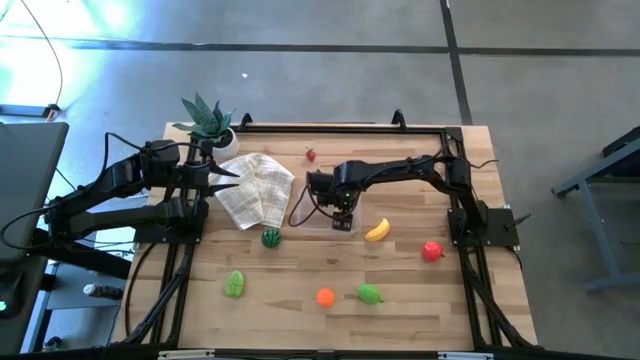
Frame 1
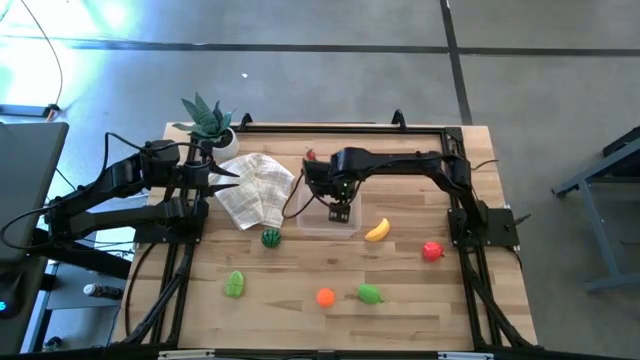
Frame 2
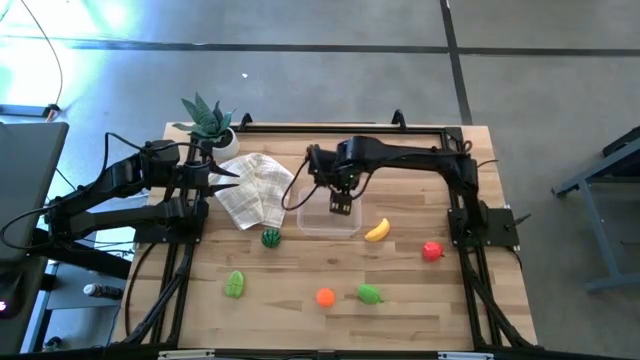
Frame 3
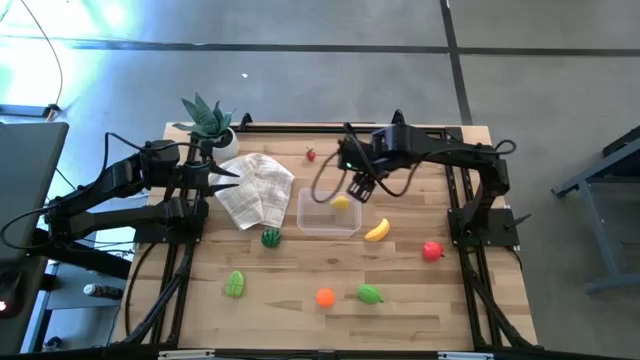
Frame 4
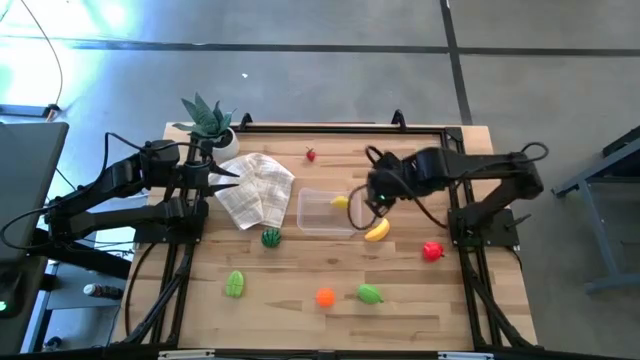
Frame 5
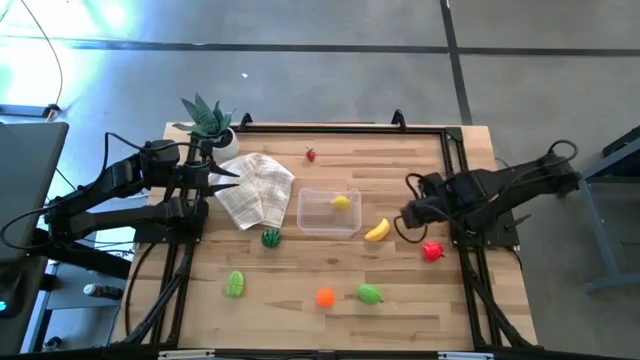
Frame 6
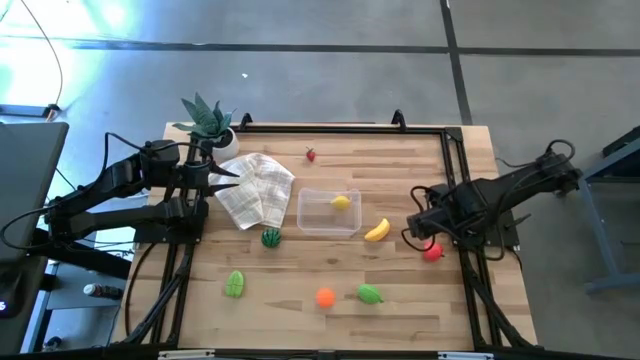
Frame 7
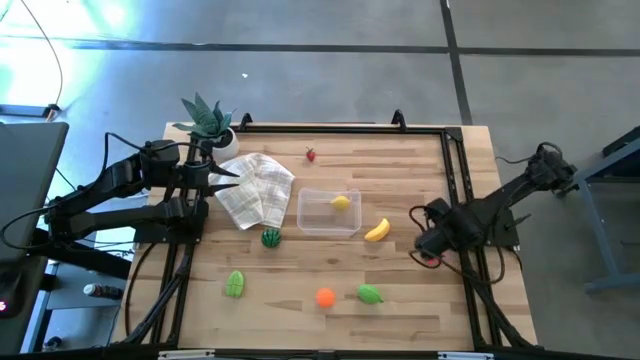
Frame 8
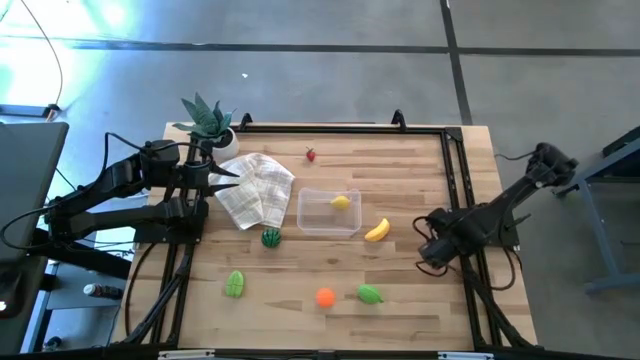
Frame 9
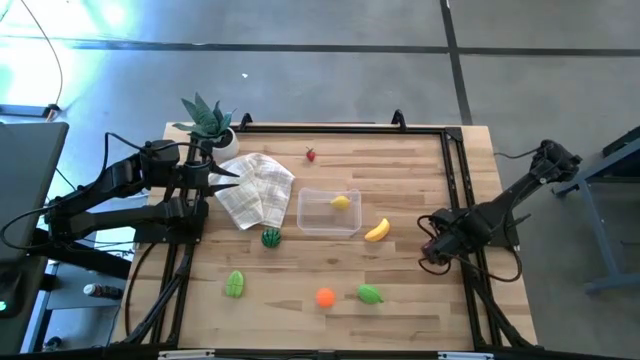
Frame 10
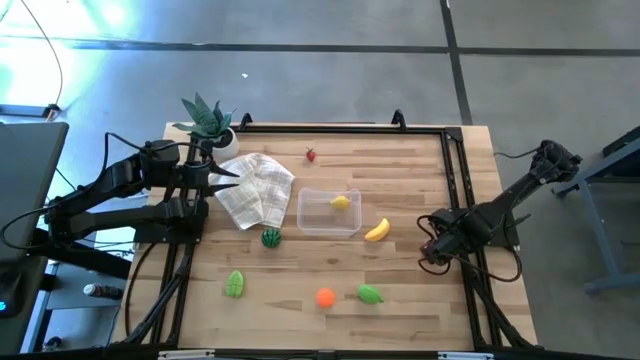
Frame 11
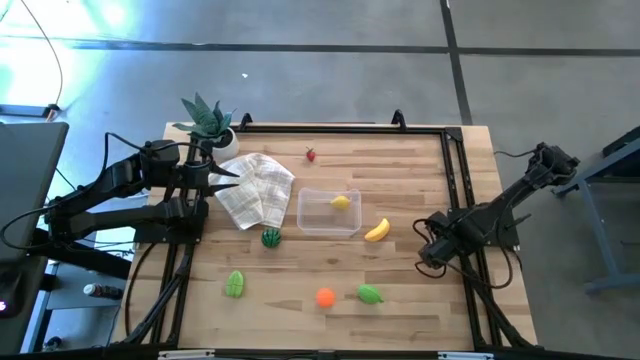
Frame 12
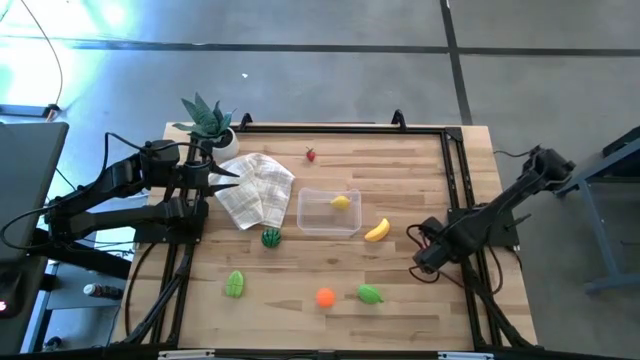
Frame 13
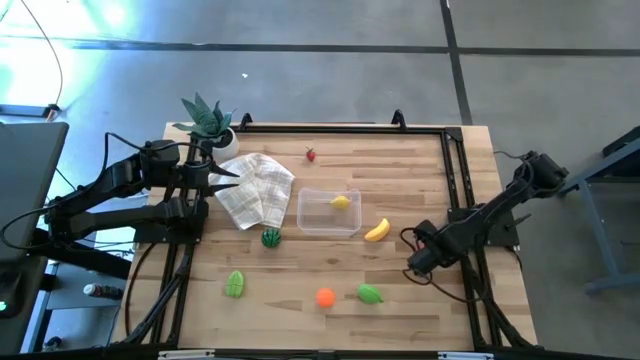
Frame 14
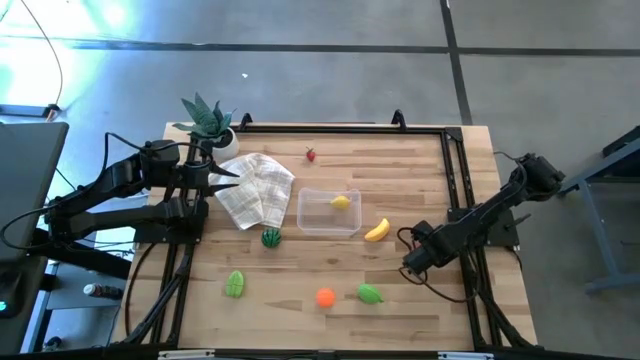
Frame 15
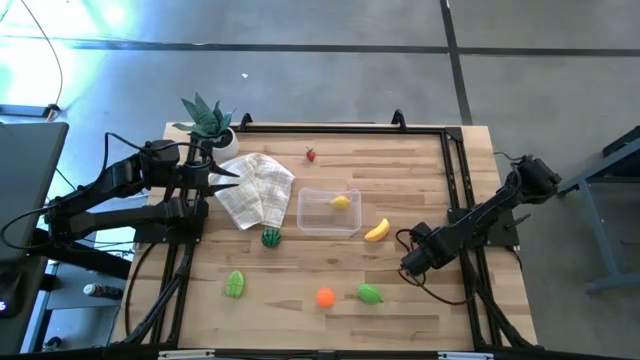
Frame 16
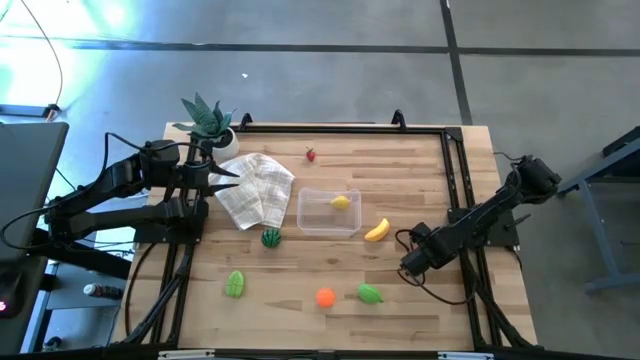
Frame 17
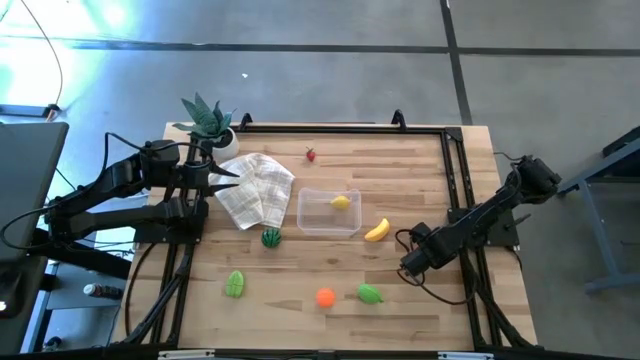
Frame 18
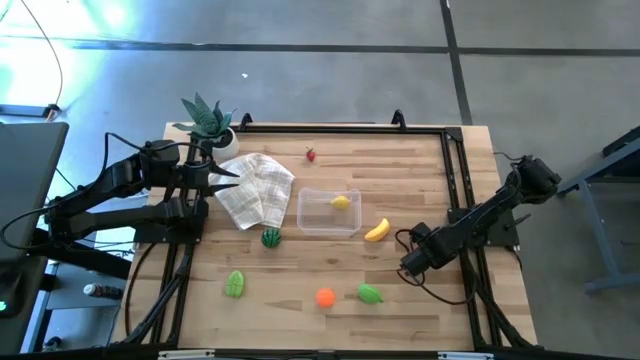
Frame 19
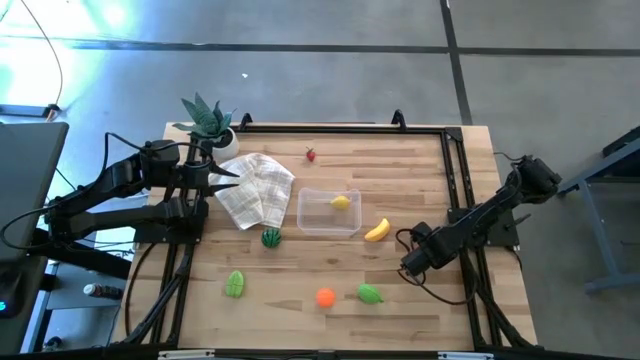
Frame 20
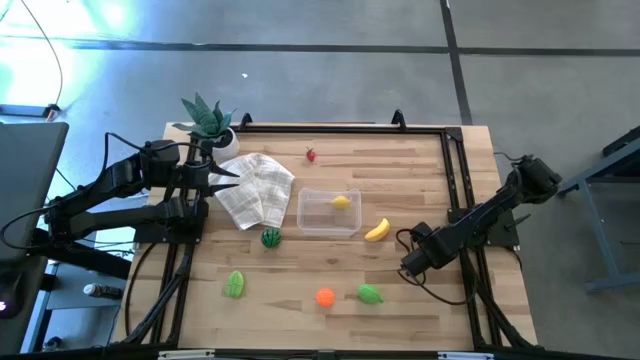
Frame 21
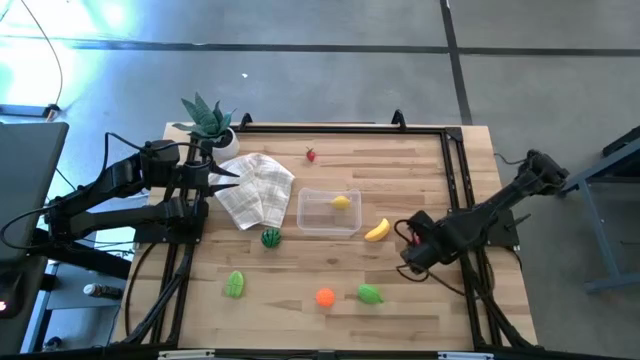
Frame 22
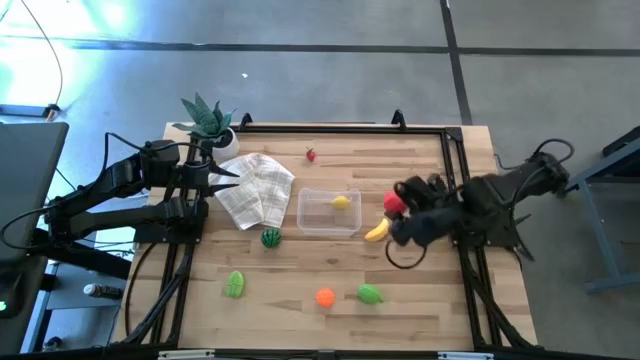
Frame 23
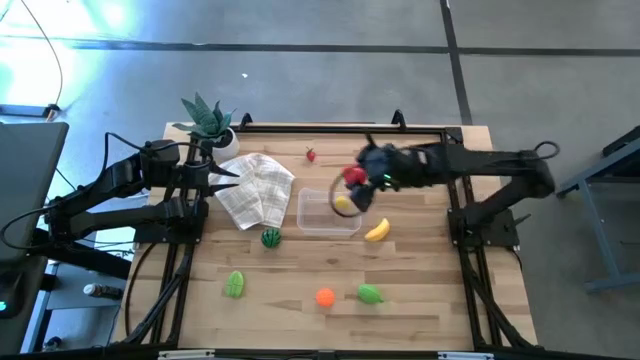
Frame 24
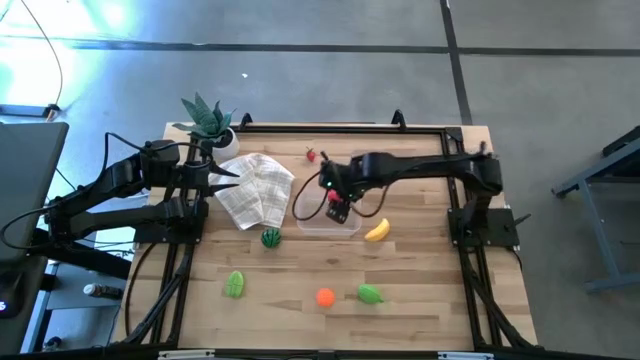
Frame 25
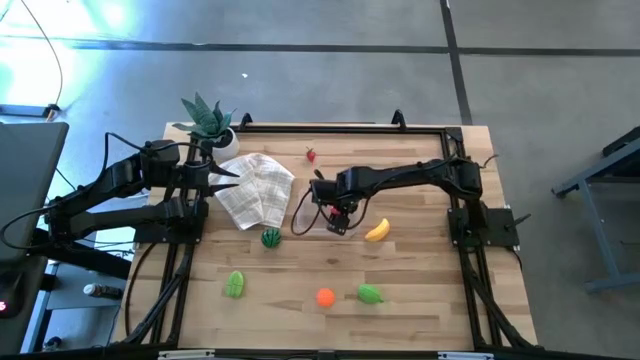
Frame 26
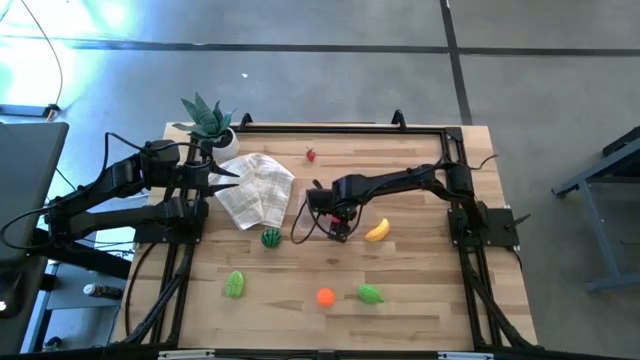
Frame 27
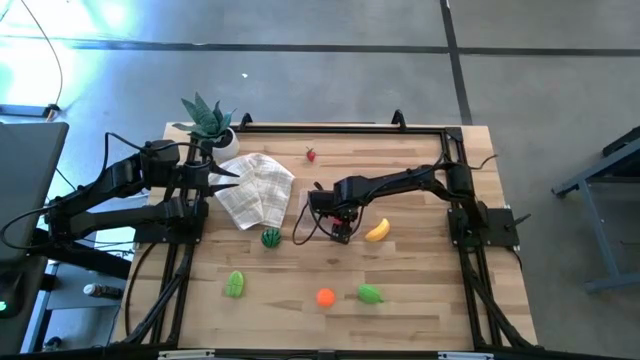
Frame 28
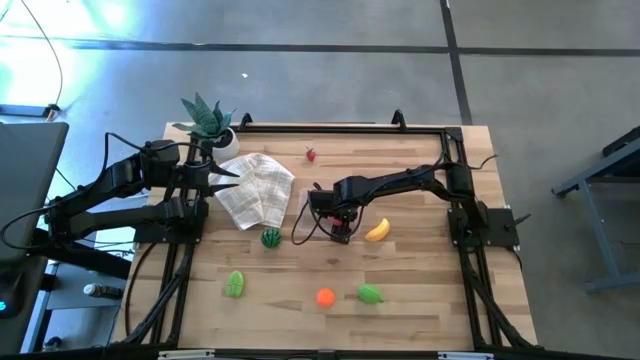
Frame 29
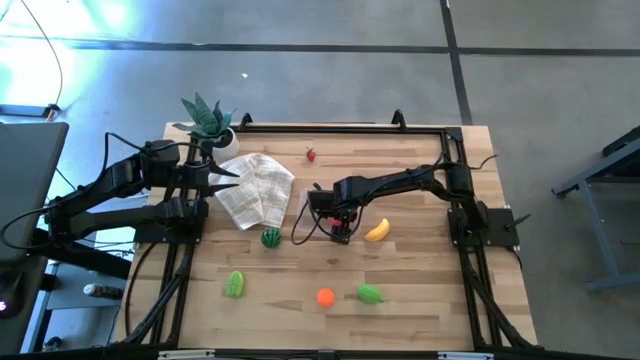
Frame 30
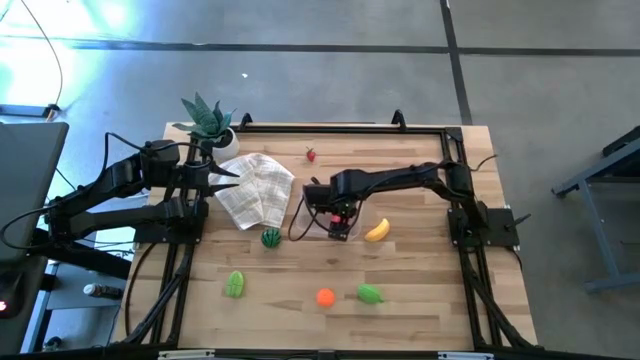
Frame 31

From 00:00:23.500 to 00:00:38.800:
Task: Pick and placing Produce into tupperware
Put the red apple into the transparent container

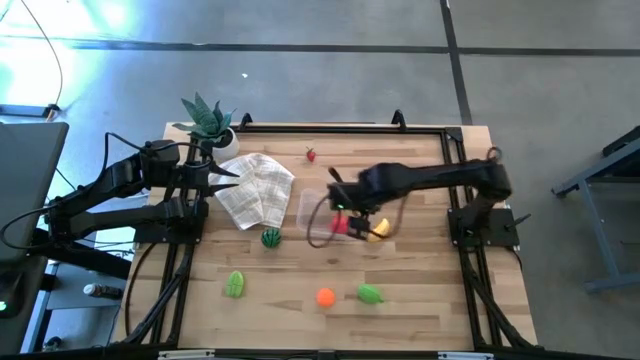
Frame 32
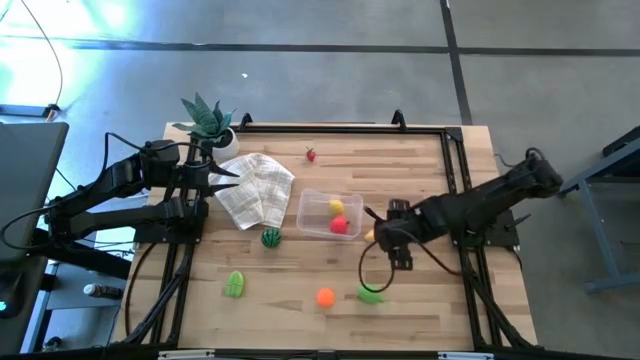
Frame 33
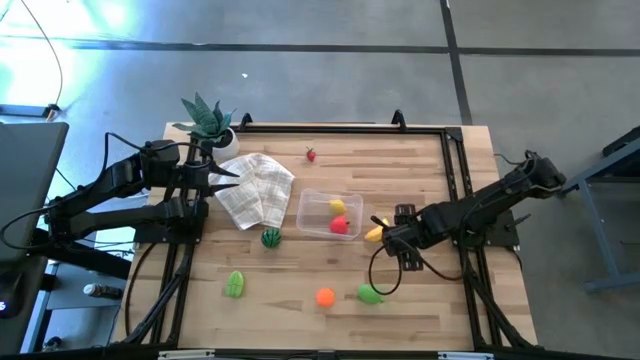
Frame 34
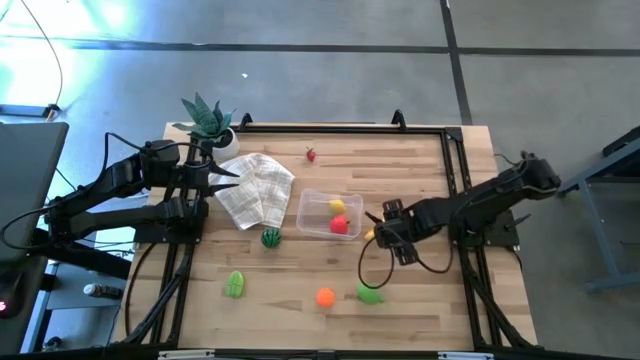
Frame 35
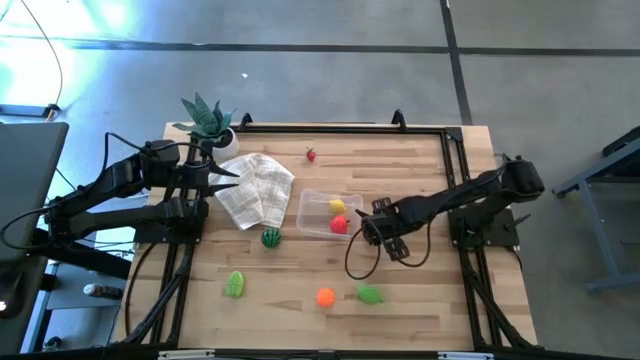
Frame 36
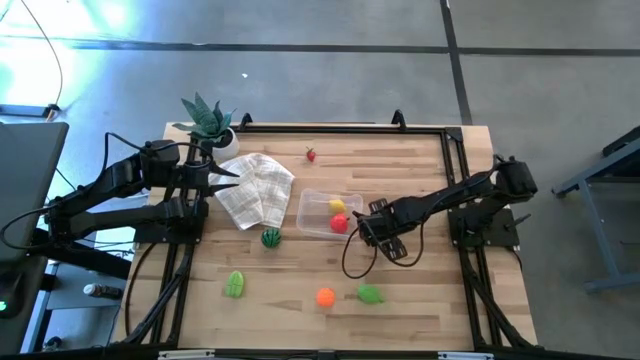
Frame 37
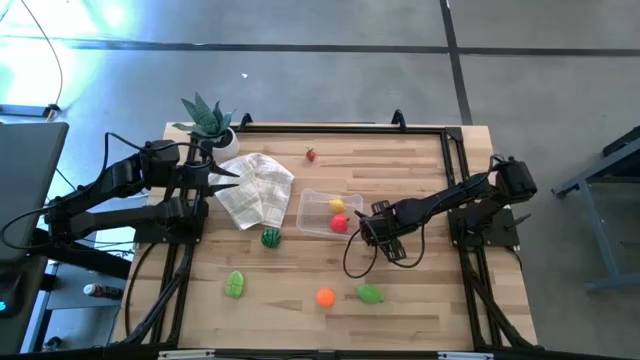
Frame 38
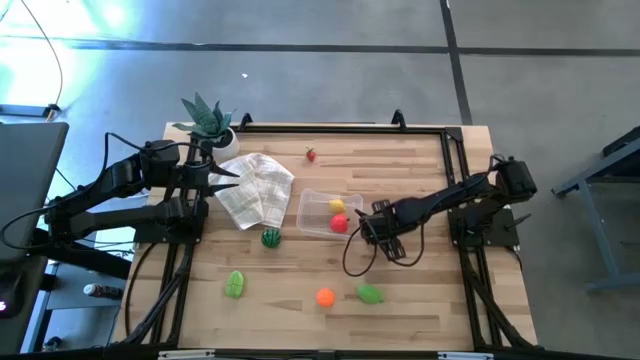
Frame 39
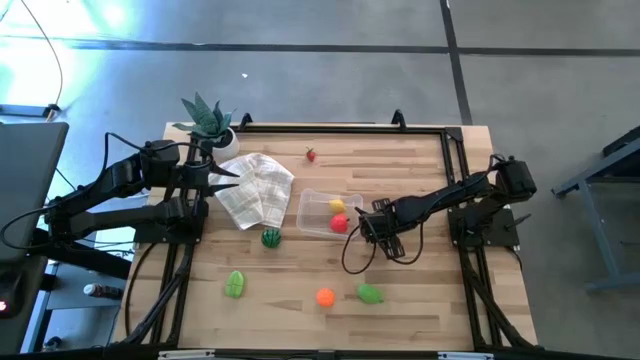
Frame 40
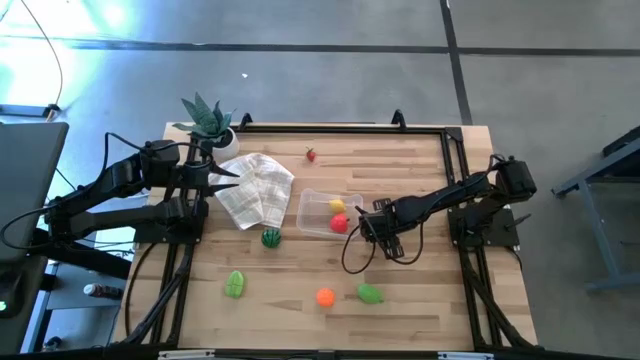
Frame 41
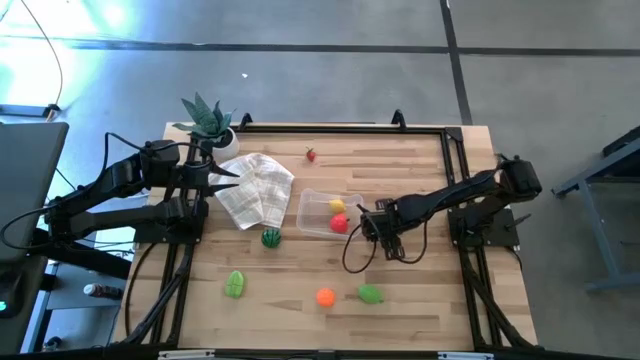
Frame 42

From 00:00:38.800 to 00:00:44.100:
Put the yellow banana into the transparent container

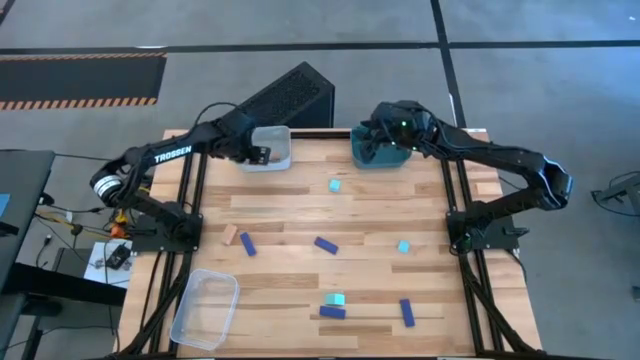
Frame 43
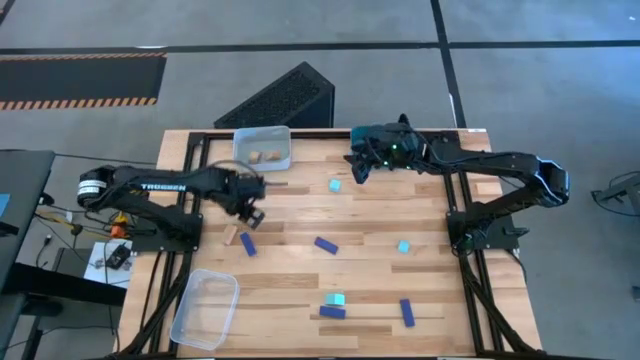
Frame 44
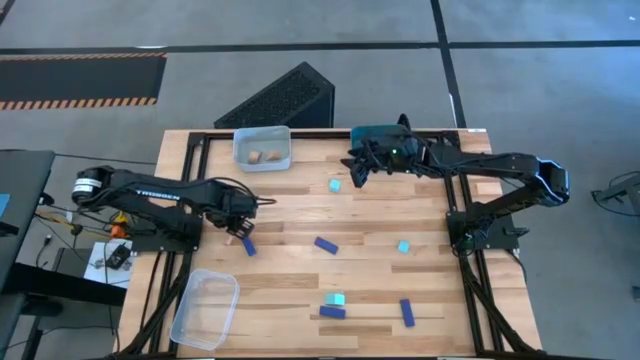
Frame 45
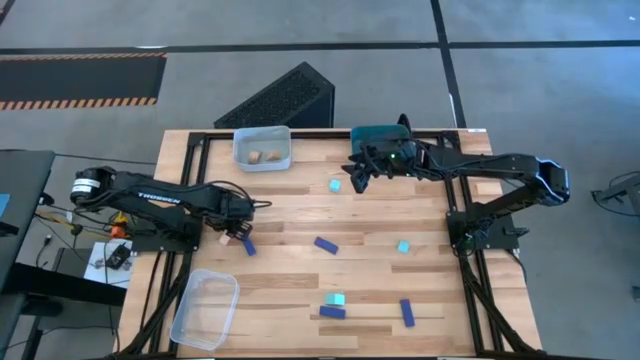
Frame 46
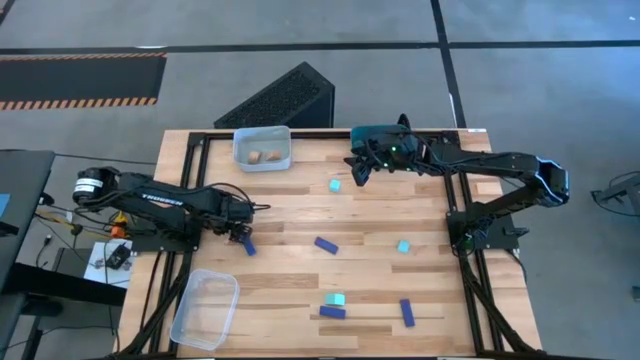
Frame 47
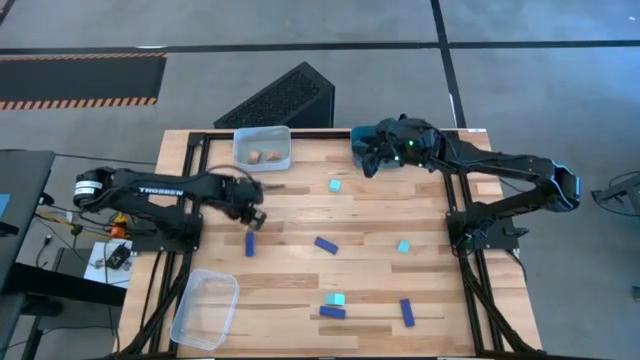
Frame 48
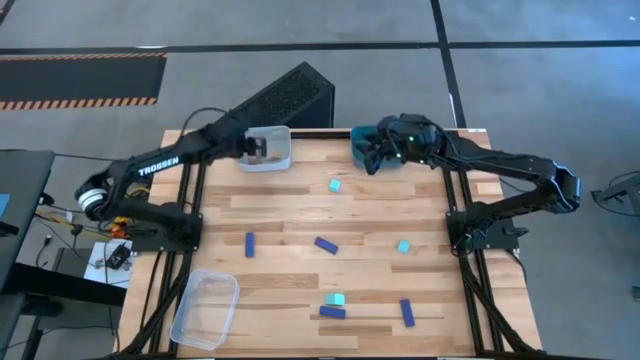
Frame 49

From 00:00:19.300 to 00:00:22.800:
Task: Sort & place blocks by color
Put the brown block into the white bin
